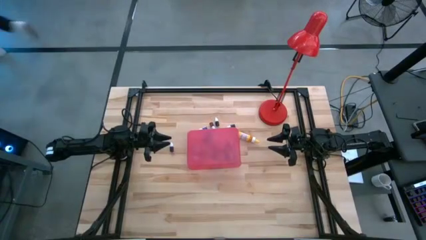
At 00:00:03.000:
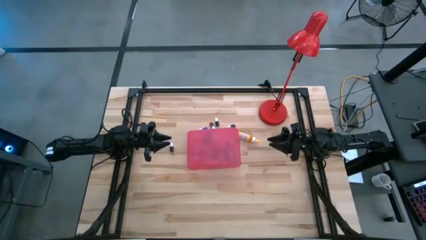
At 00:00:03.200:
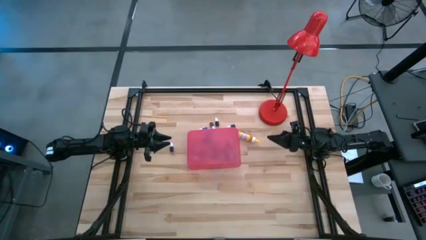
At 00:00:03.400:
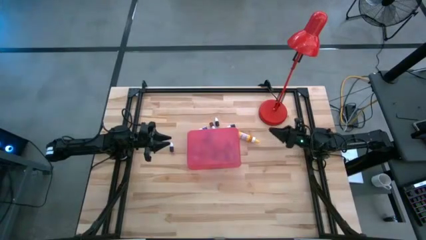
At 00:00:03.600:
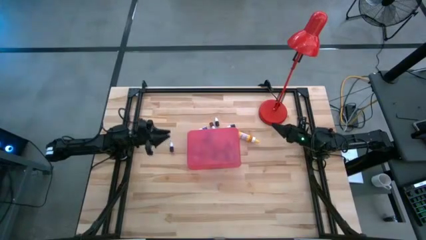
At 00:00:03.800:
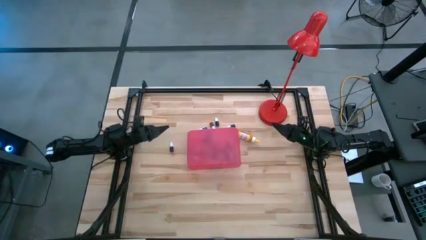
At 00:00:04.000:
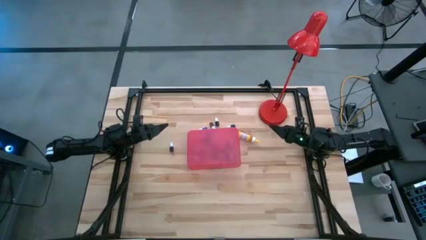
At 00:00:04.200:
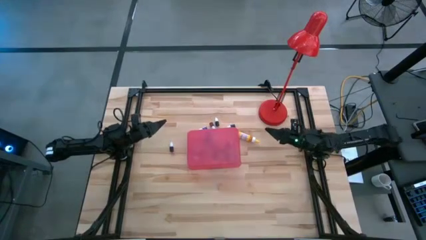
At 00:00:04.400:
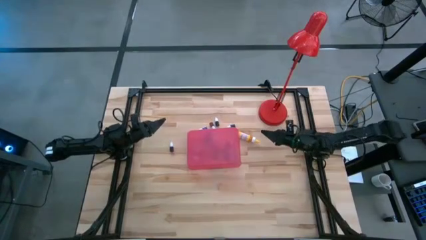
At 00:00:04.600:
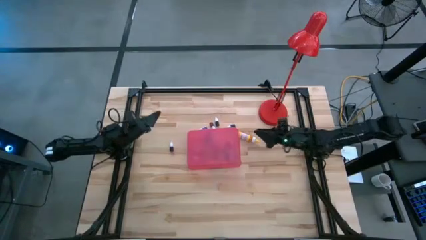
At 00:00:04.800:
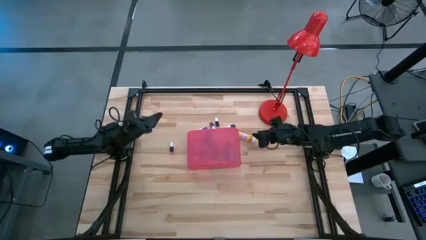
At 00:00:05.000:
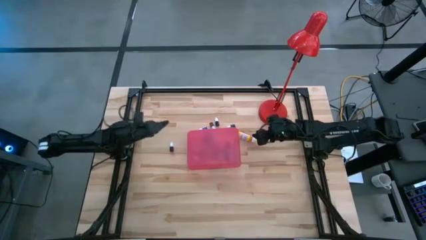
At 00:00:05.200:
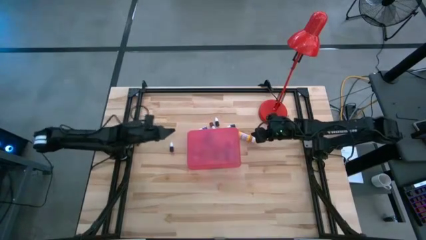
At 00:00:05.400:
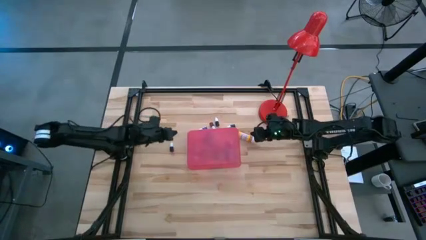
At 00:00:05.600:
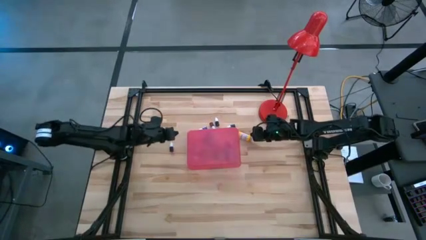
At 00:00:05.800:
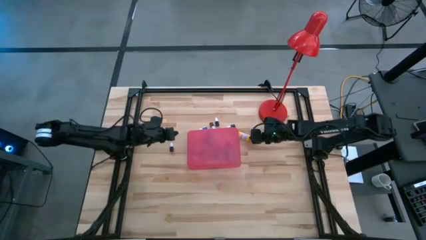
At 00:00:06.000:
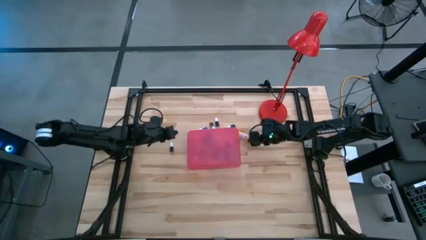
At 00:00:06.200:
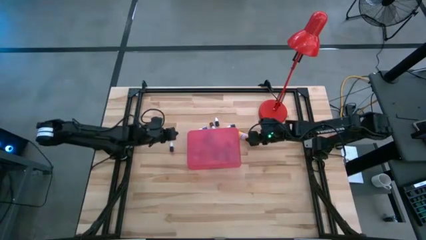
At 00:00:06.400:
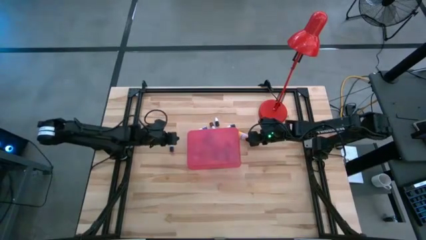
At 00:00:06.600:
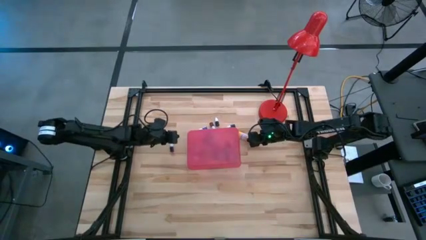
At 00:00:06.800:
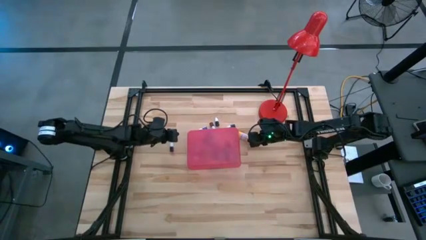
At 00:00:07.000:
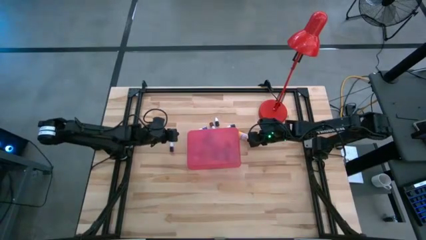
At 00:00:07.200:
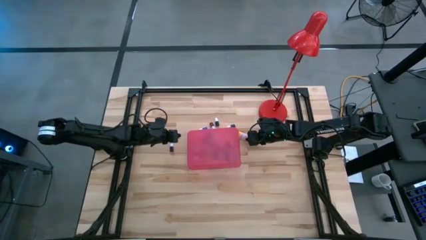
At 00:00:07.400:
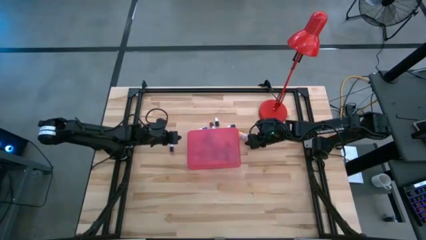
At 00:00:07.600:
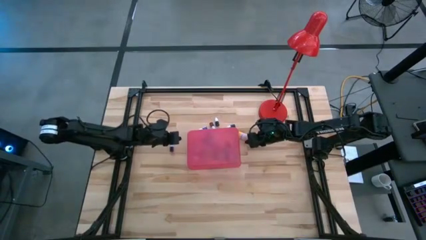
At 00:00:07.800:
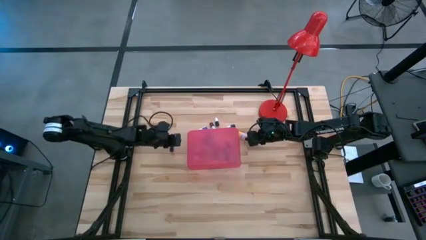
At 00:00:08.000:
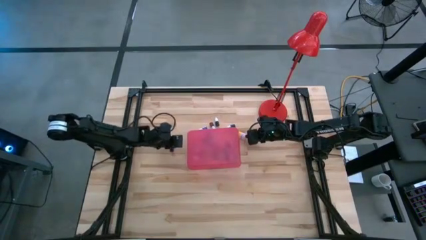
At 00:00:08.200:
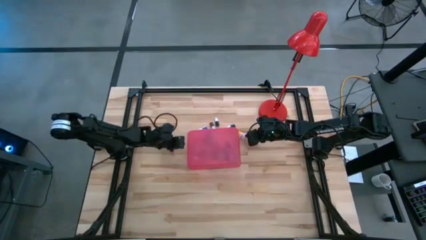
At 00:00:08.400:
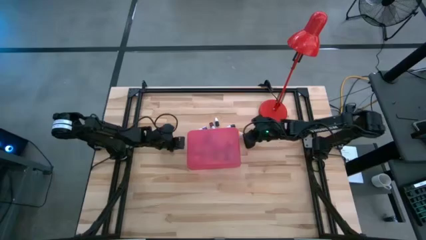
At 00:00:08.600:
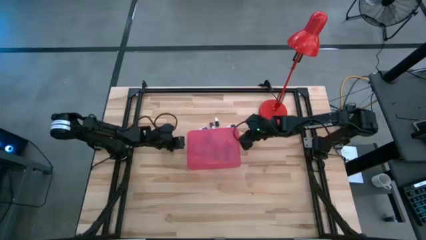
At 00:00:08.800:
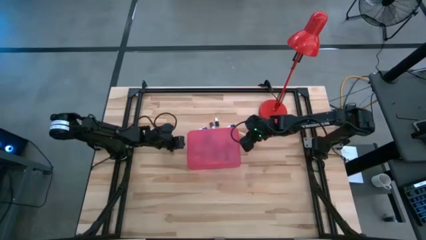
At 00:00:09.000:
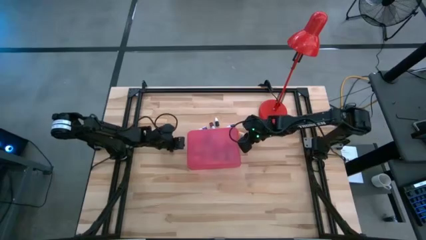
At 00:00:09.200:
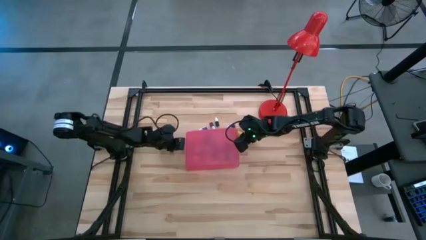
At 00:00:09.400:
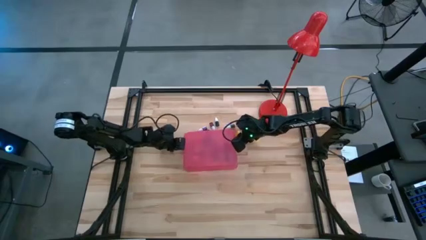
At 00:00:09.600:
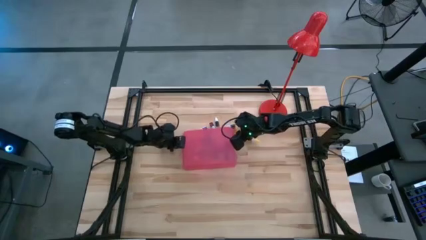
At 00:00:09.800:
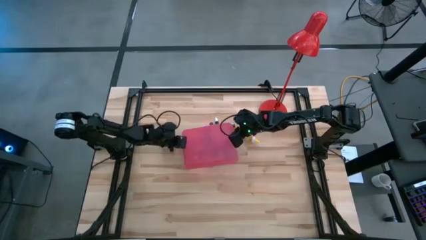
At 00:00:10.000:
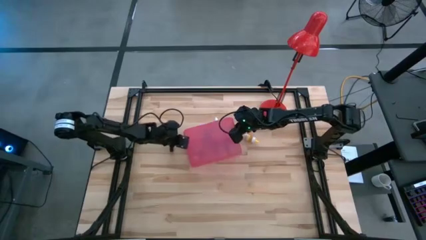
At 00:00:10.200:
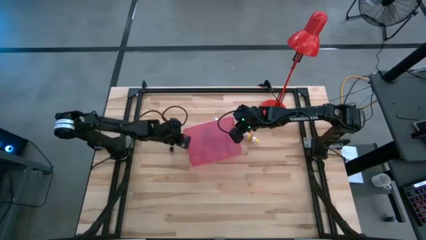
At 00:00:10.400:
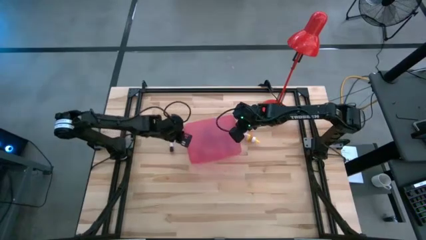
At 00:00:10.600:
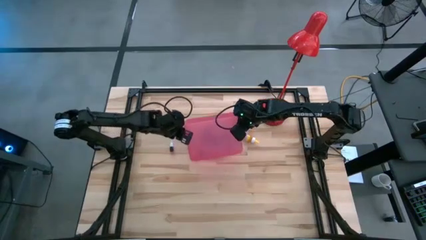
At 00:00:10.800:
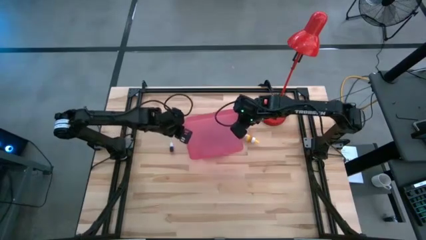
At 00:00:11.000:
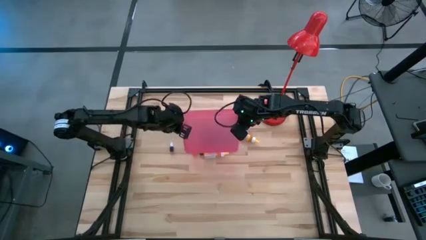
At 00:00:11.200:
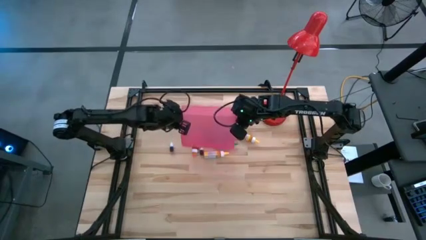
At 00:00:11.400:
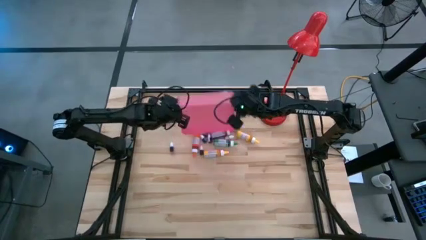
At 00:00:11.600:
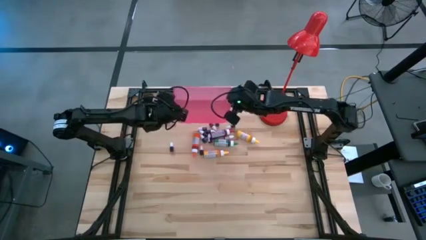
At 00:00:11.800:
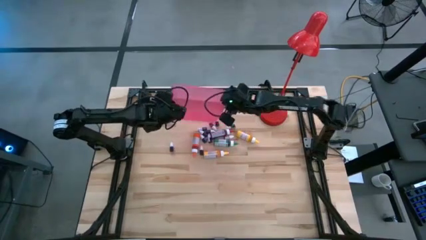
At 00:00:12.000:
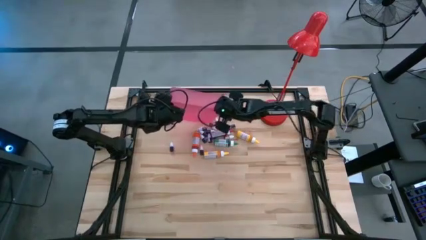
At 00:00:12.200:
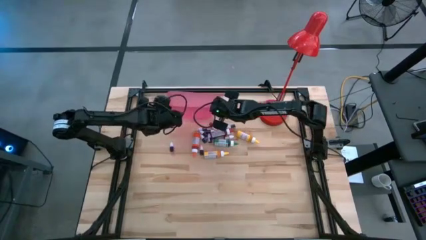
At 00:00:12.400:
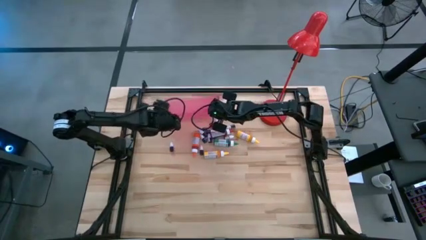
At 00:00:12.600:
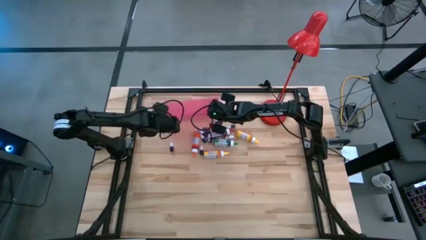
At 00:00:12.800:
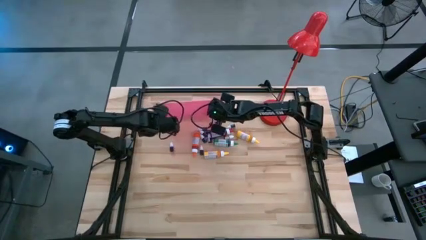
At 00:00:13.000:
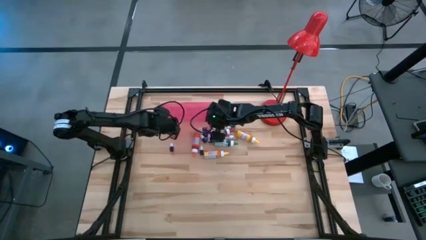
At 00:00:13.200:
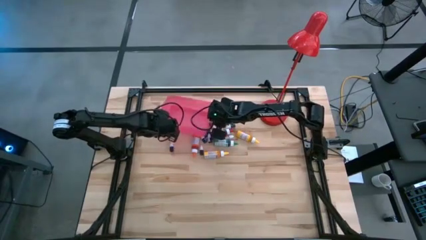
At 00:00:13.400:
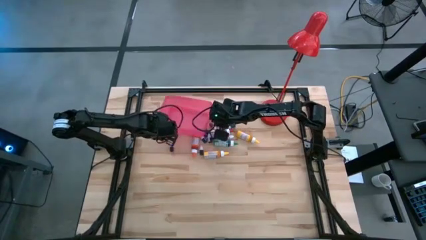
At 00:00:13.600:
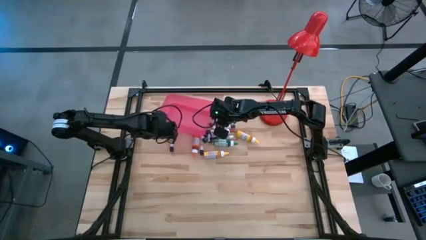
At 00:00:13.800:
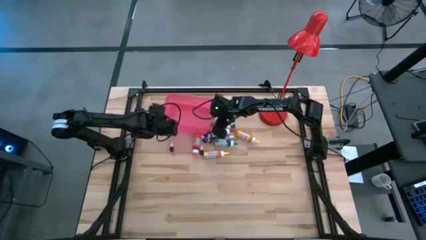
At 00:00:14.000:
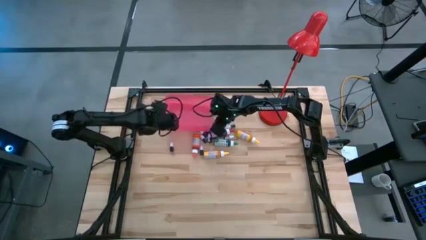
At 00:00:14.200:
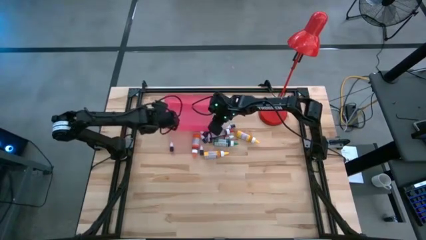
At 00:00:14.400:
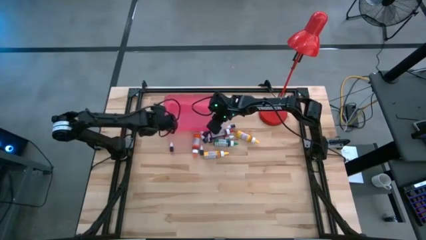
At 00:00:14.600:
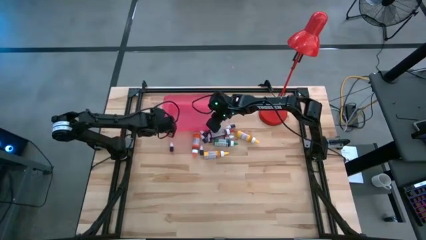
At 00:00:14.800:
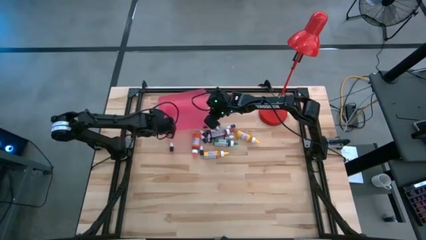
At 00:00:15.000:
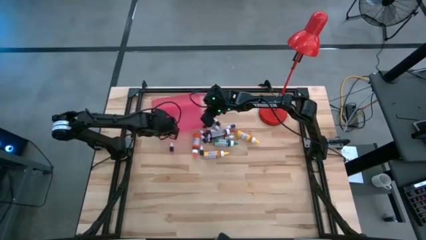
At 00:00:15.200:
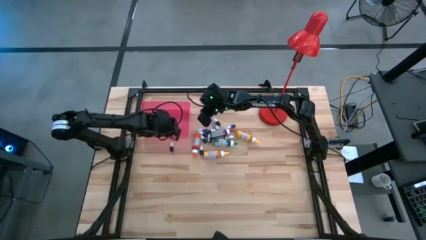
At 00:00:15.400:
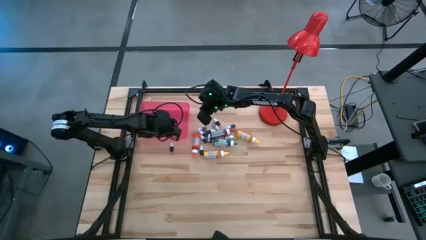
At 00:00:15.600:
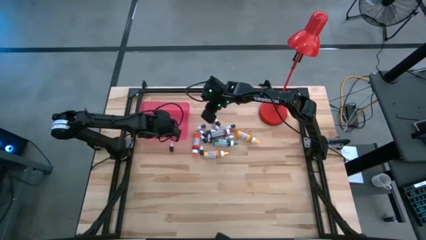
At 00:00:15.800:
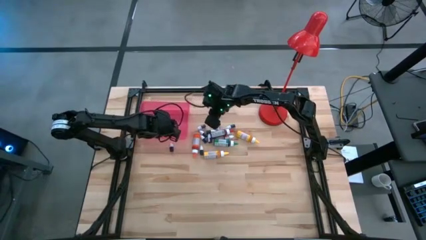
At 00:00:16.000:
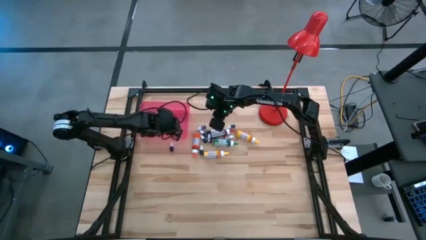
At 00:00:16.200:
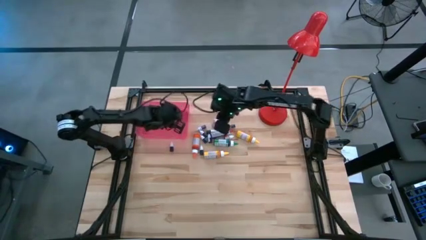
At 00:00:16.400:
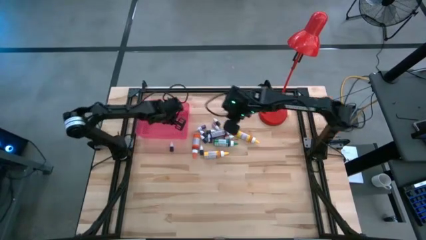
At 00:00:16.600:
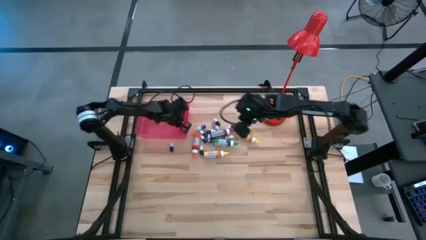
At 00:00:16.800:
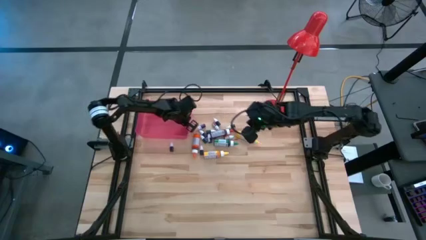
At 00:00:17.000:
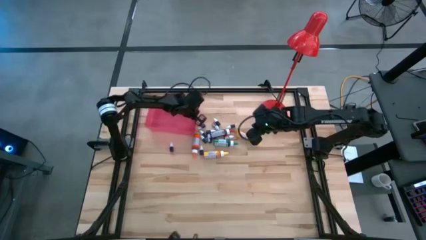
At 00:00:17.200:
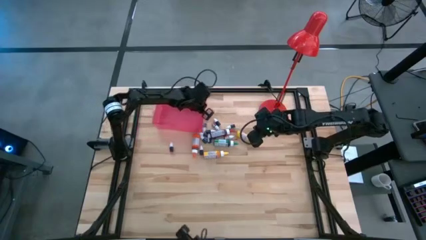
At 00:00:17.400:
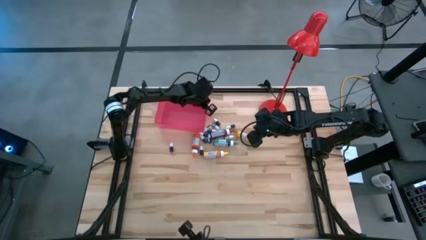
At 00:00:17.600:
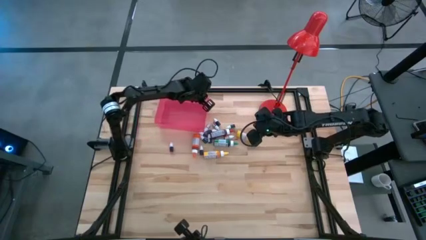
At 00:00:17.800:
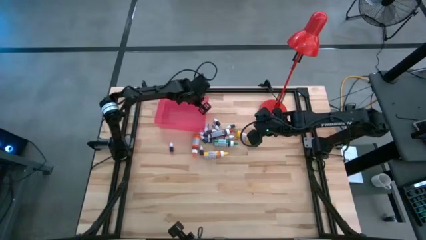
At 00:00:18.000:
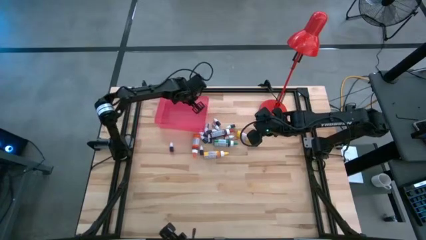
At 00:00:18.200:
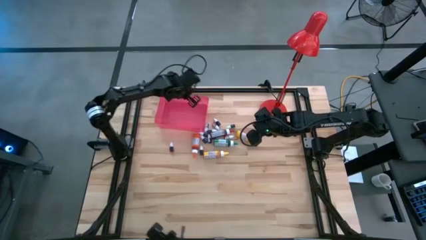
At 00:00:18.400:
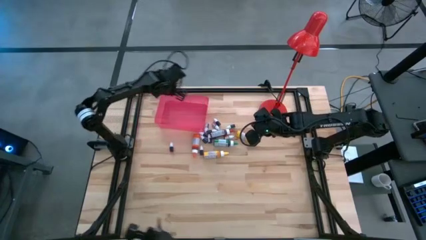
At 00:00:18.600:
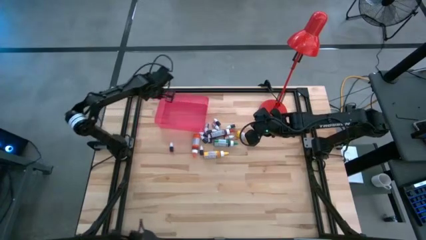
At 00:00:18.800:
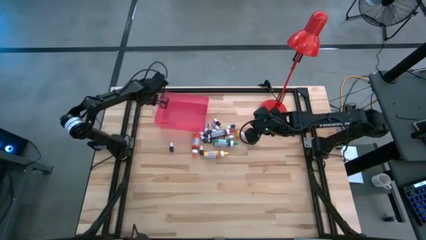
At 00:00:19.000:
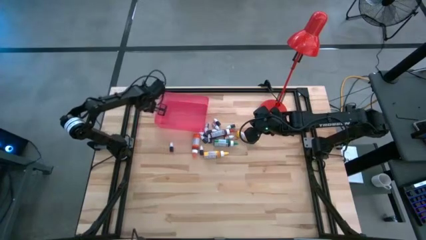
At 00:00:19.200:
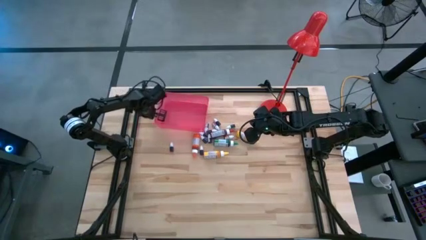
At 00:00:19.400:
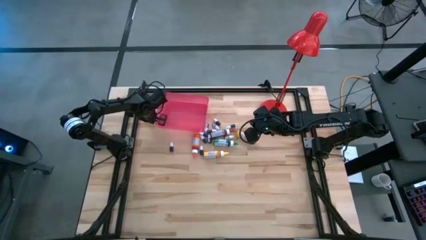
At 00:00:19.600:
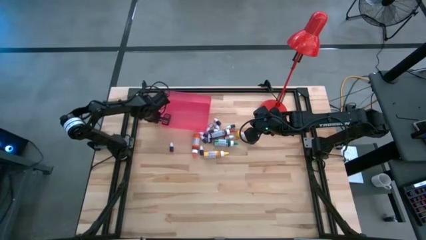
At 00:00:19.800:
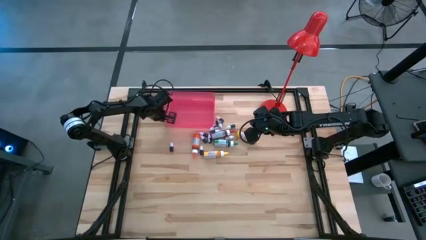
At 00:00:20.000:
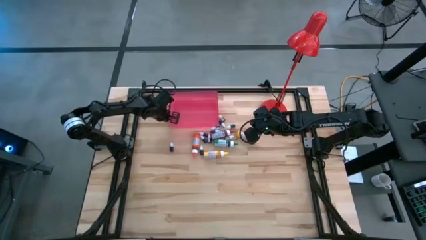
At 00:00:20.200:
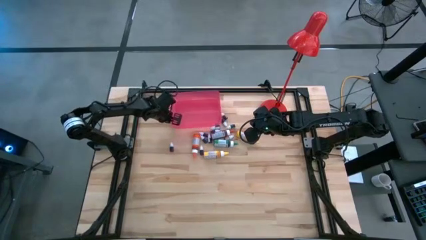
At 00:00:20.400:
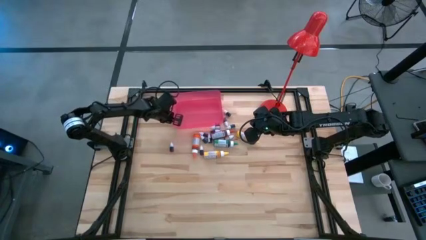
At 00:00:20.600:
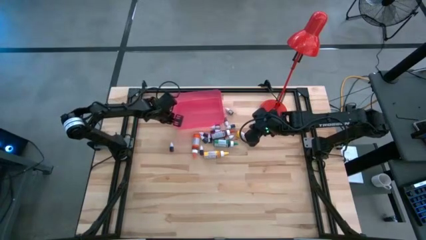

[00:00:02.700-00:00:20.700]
Task: Pick & Place food coloring
Prepare the red bin
